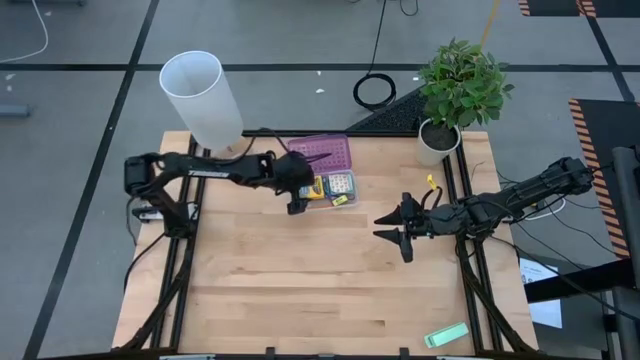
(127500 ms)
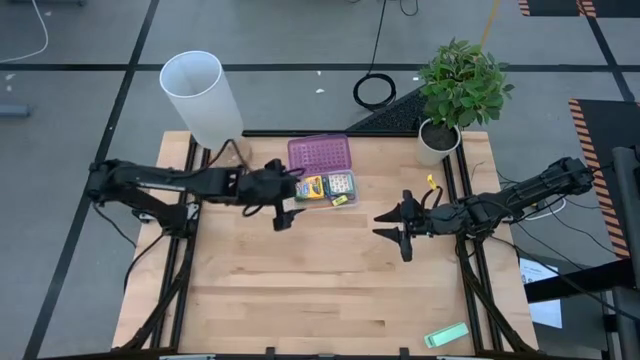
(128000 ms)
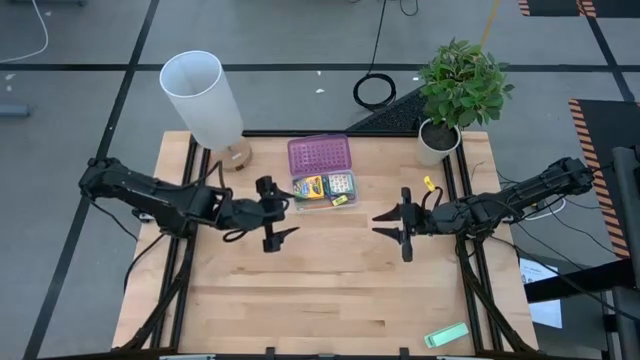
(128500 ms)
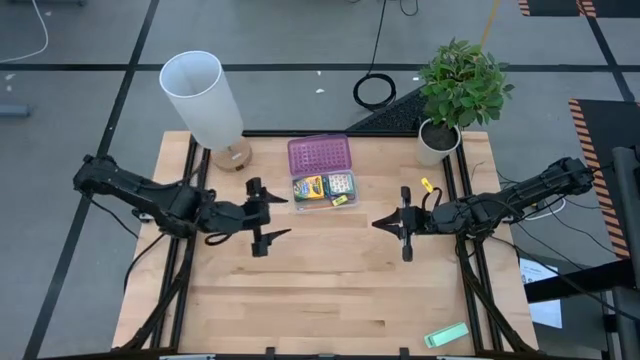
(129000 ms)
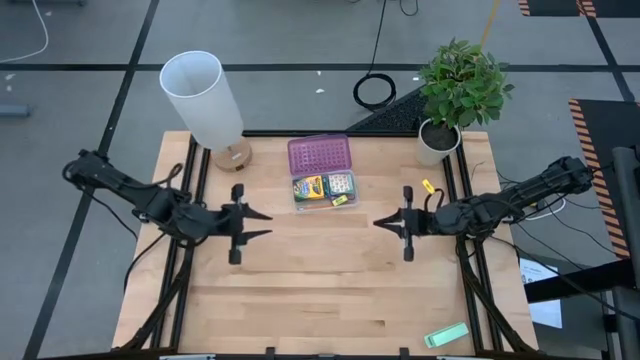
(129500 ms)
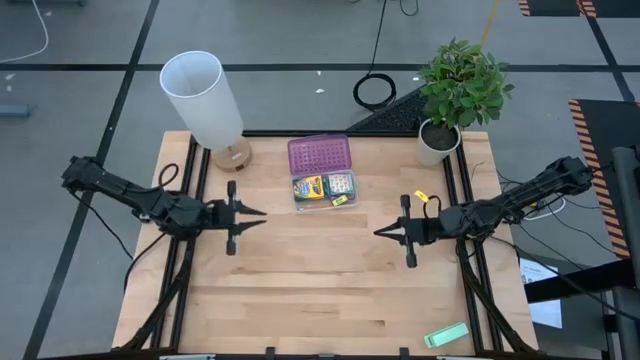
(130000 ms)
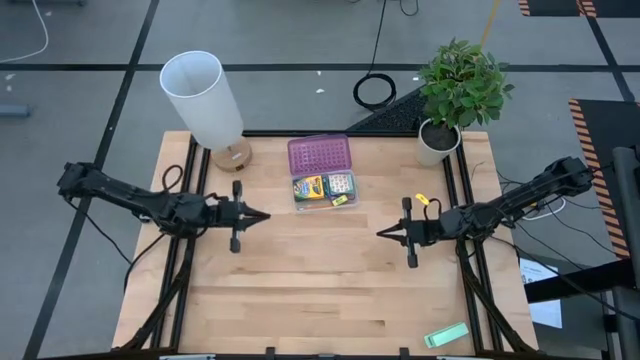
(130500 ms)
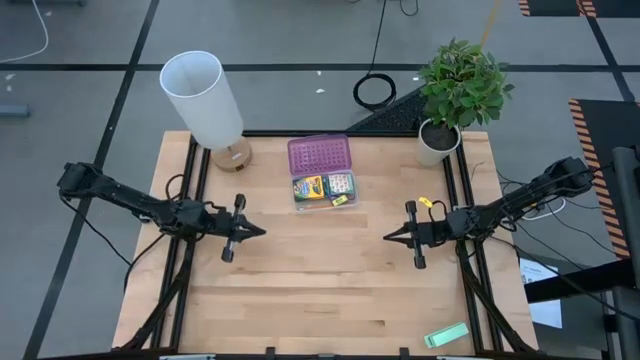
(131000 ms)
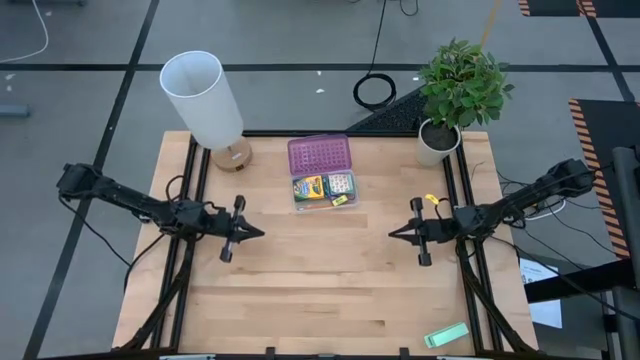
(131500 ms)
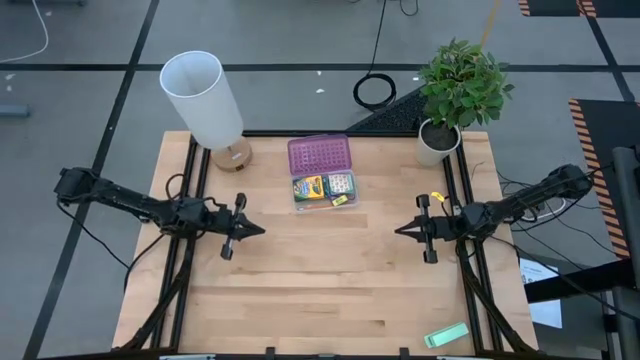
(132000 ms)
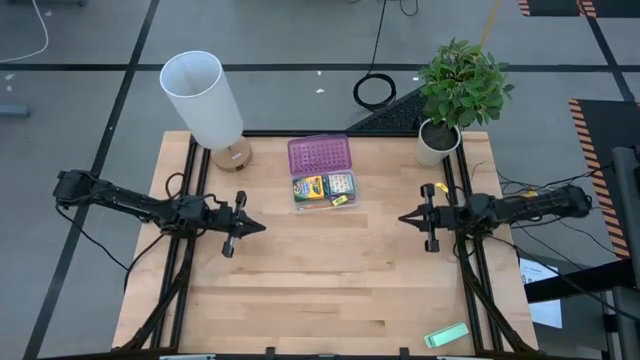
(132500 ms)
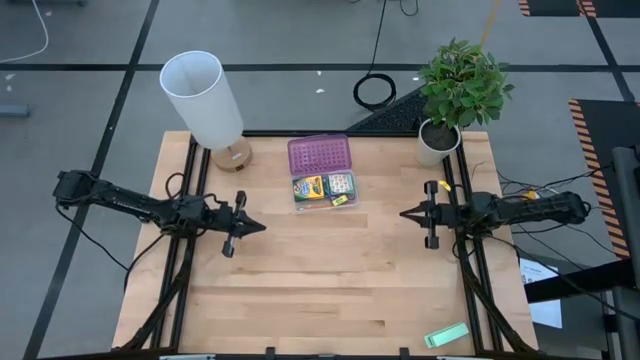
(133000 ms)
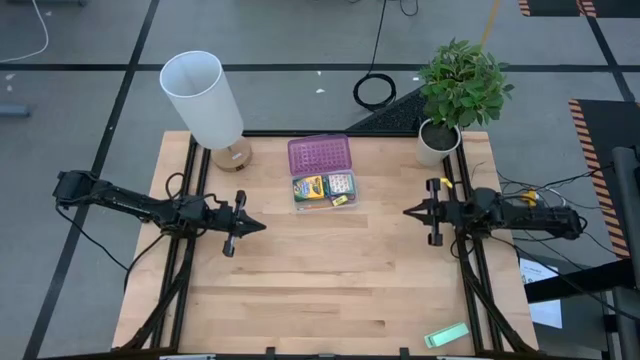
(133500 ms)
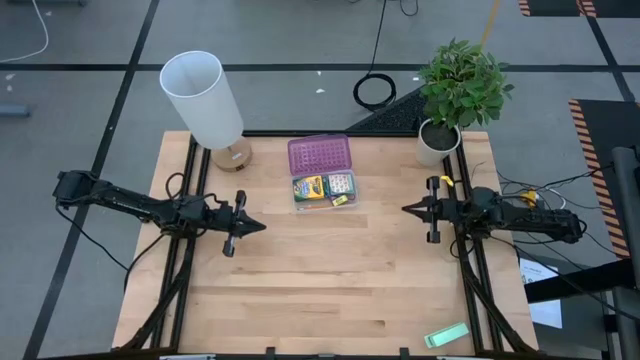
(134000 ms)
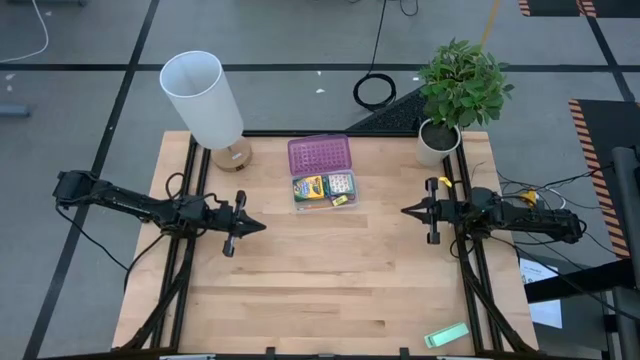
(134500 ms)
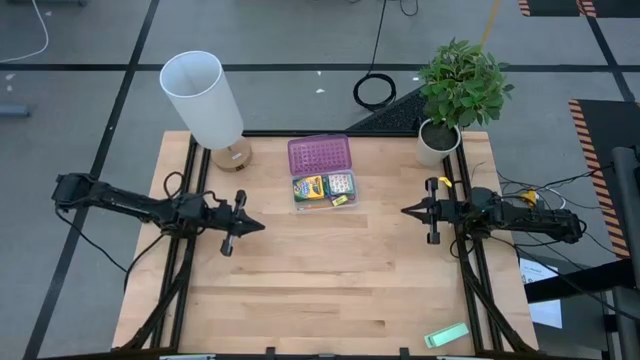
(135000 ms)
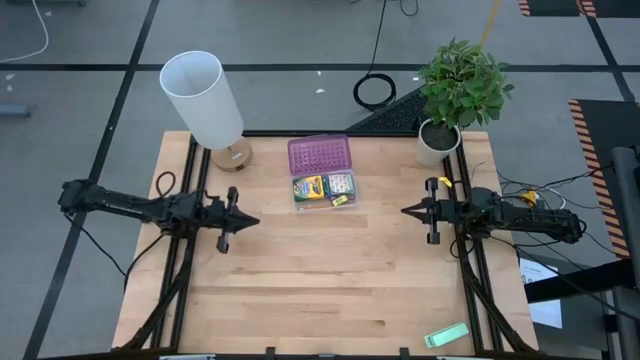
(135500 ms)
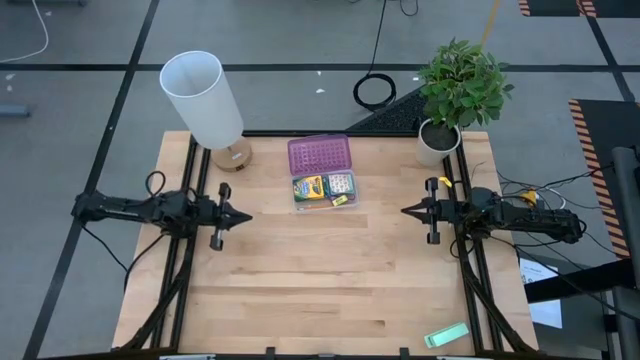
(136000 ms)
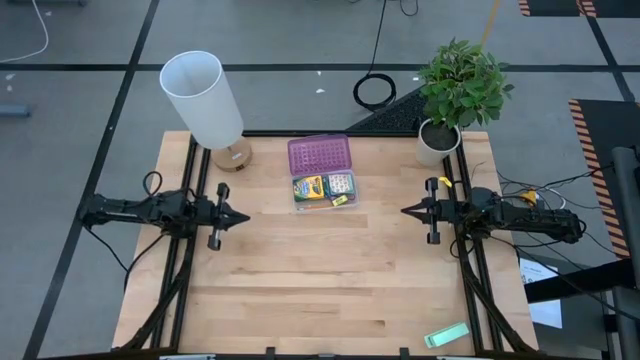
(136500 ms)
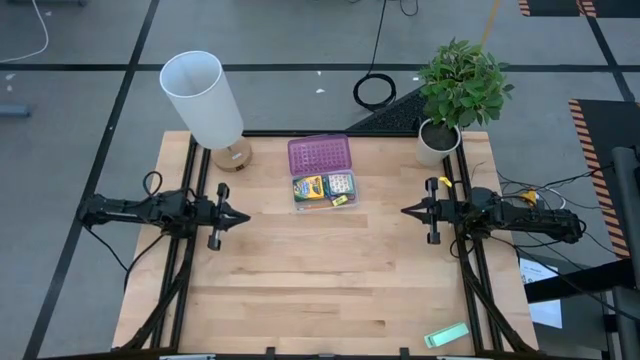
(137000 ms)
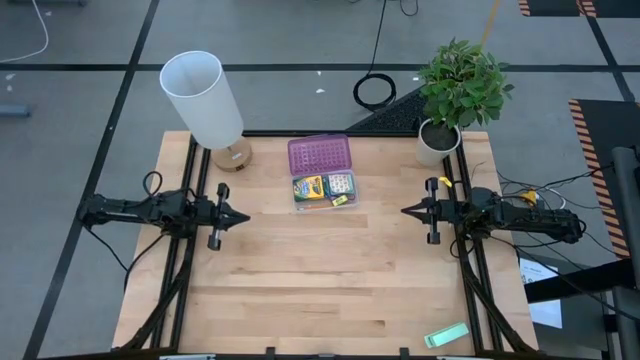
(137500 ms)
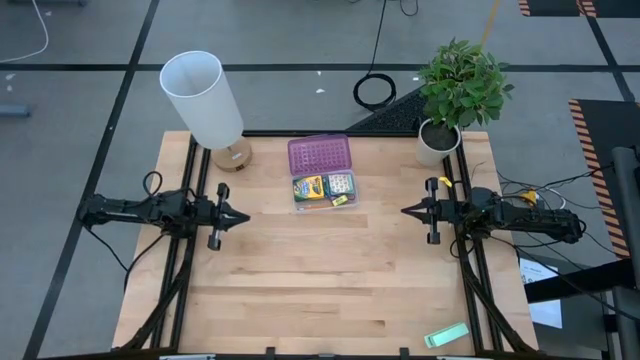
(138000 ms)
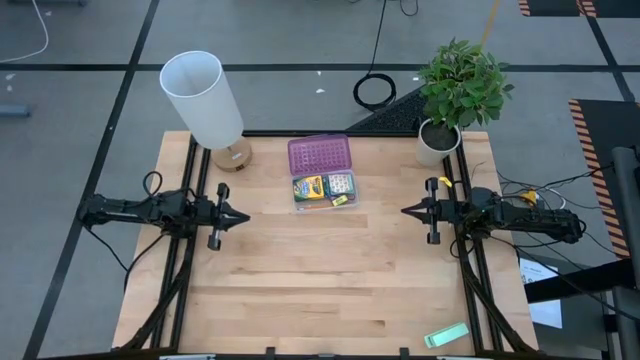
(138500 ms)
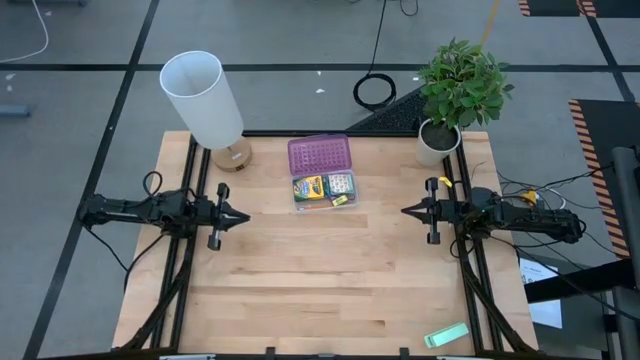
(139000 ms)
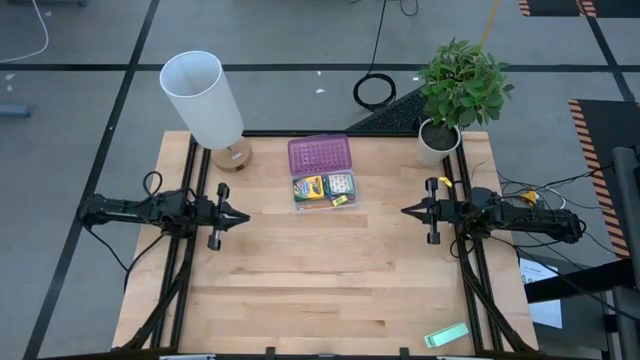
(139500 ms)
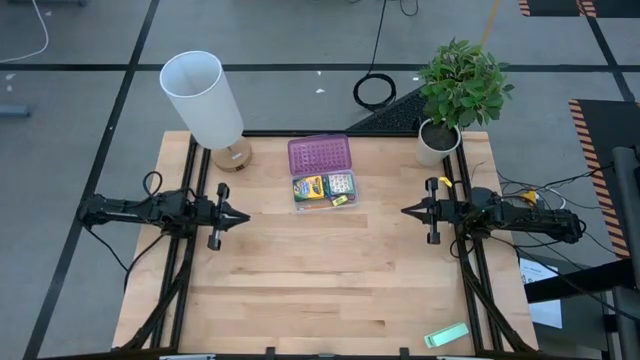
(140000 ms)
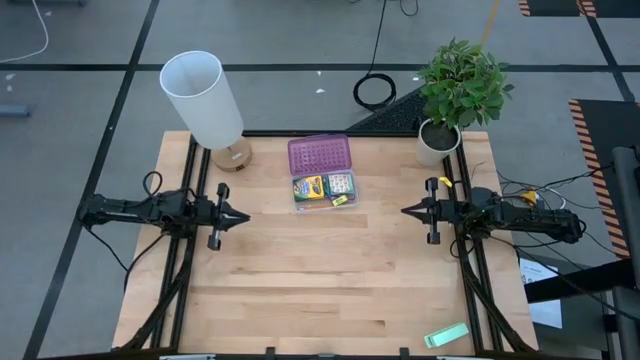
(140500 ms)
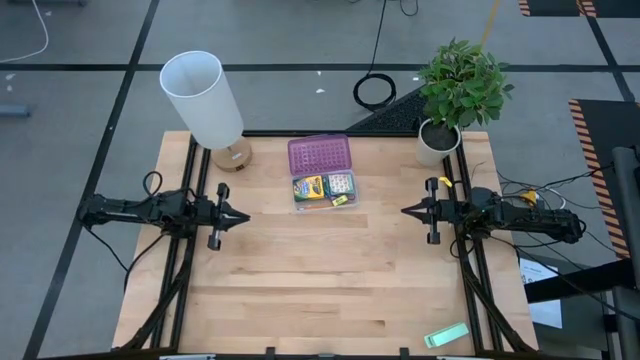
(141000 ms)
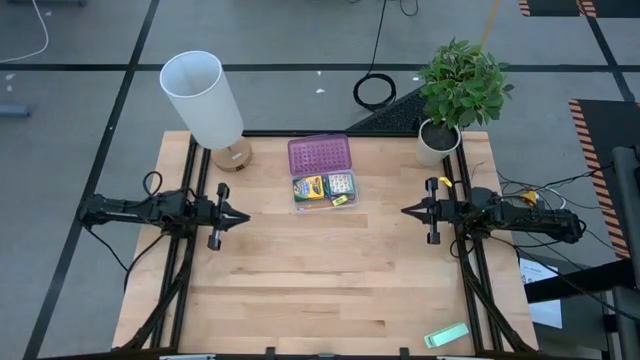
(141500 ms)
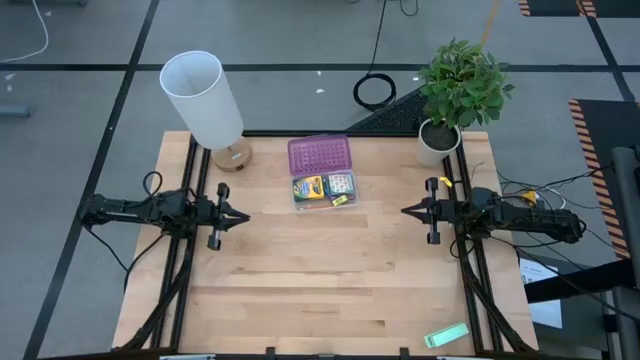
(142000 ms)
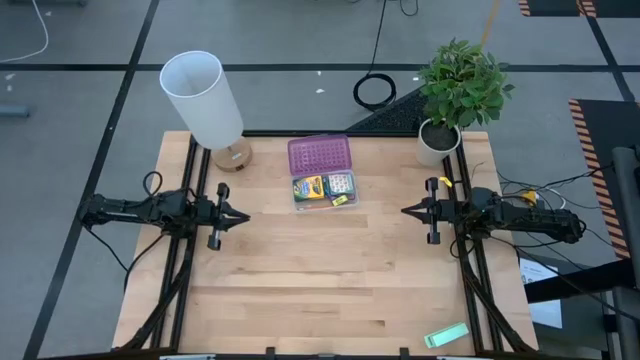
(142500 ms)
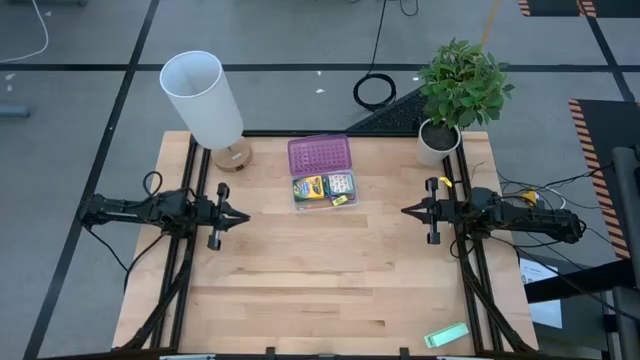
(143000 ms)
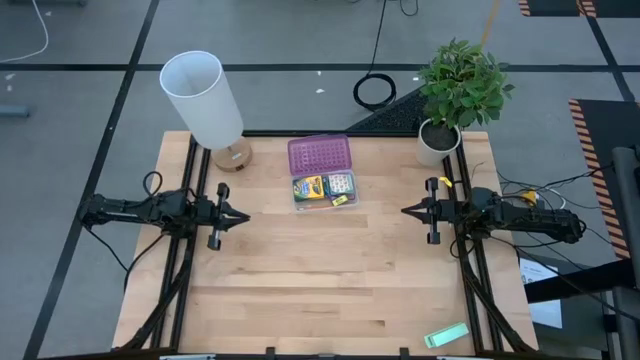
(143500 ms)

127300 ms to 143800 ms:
Task: Pack school essentials
Return to Home Position

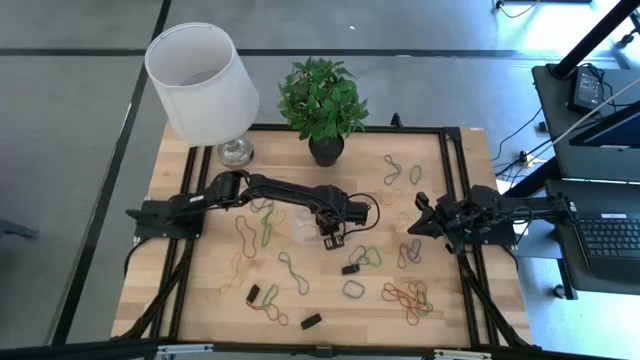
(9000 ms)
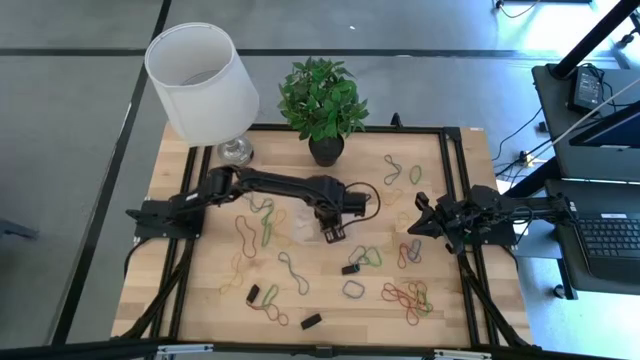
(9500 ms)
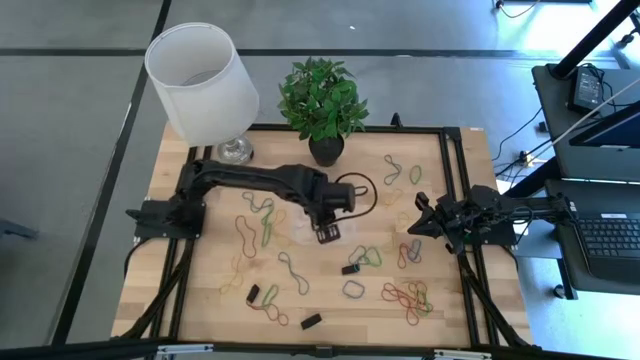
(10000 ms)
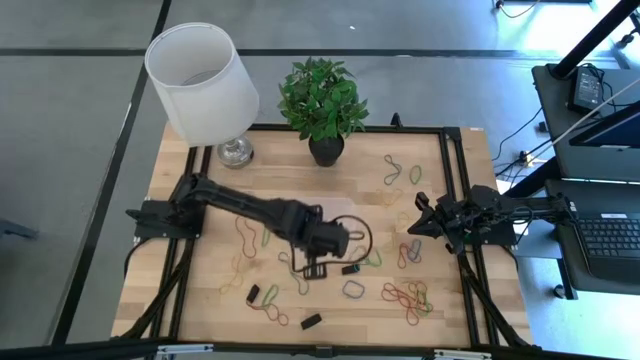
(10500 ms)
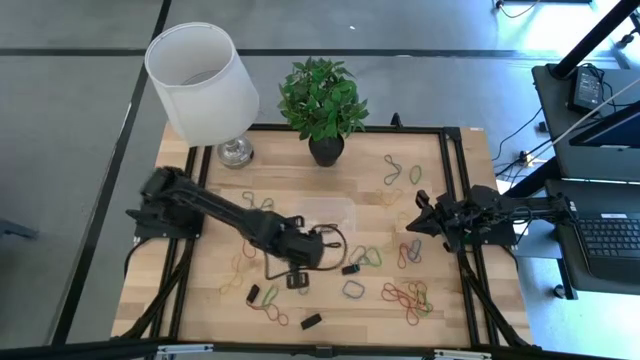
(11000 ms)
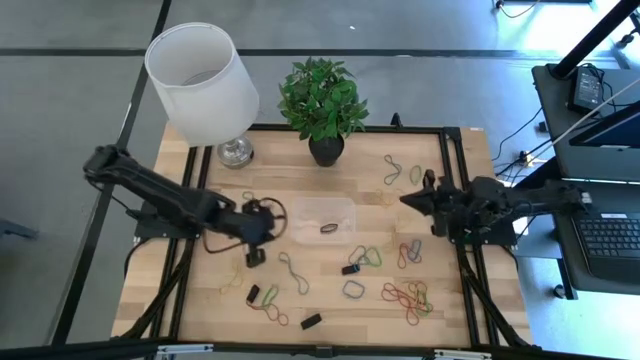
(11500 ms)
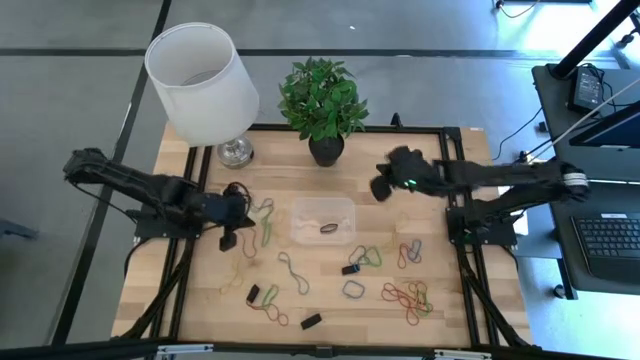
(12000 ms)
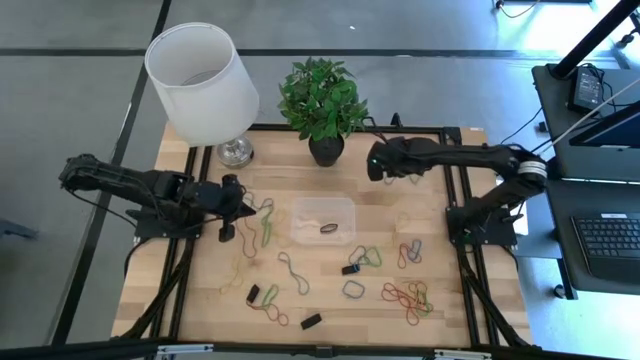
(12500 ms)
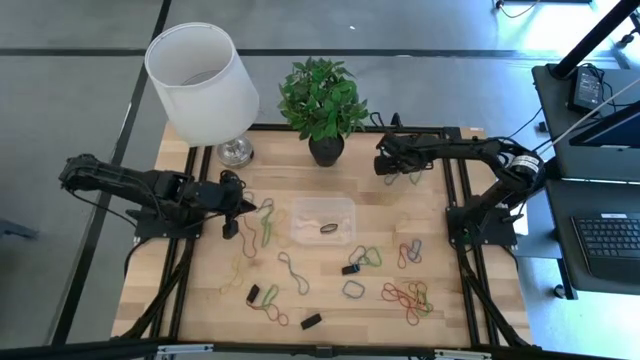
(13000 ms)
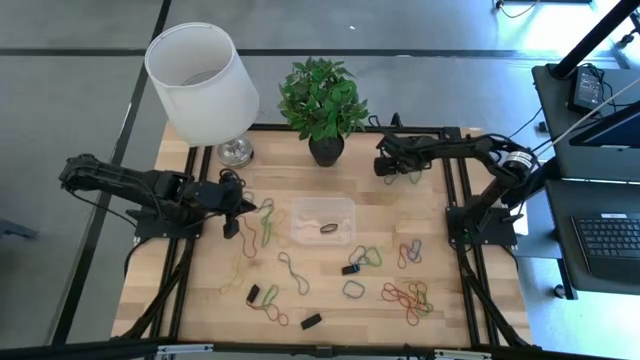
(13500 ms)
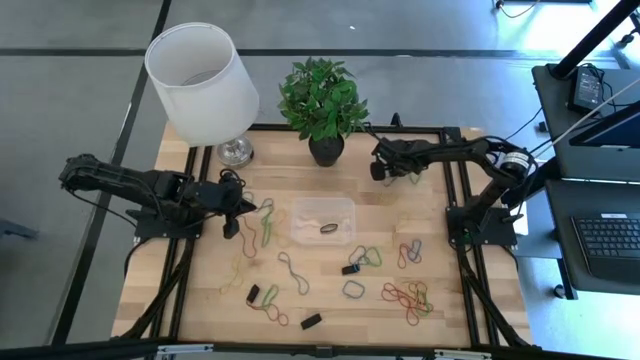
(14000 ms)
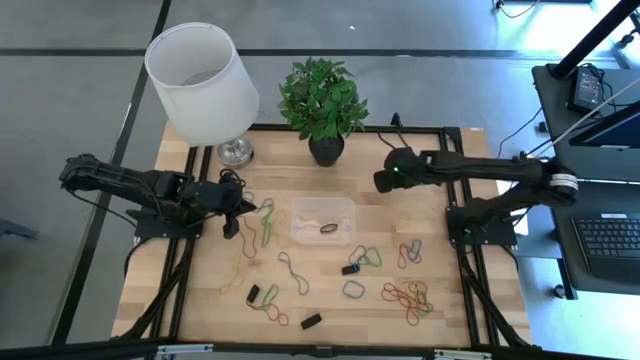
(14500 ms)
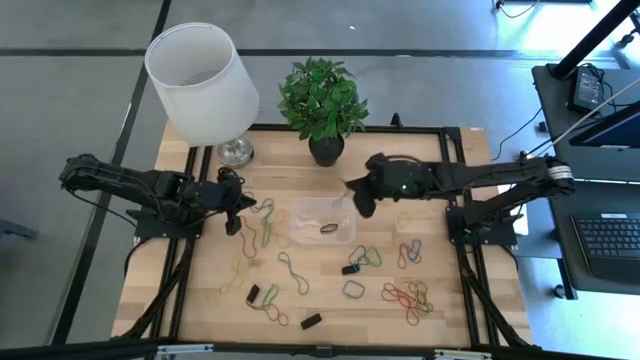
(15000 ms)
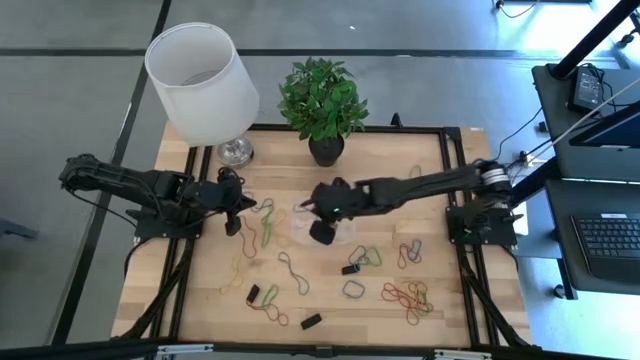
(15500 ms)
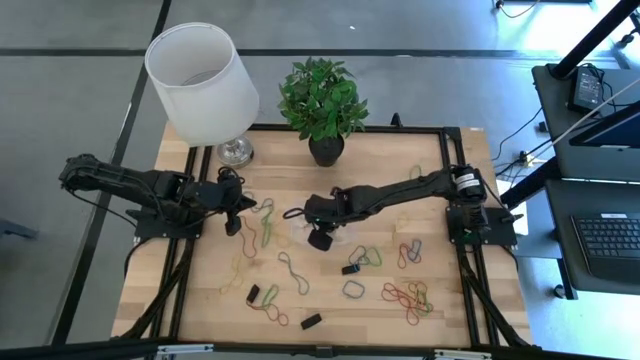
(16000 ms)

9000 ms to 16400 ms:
Task: Pick and place rubber bands into bin
Put the blue rubber band into the transparent container
